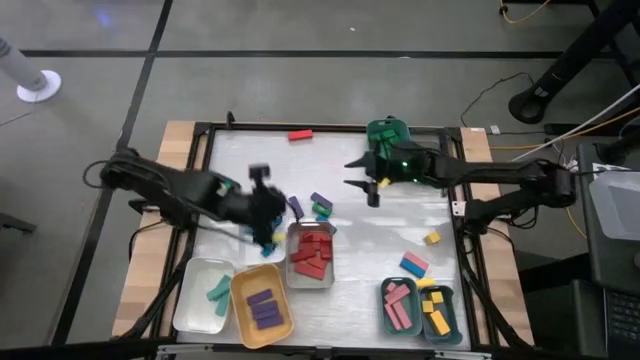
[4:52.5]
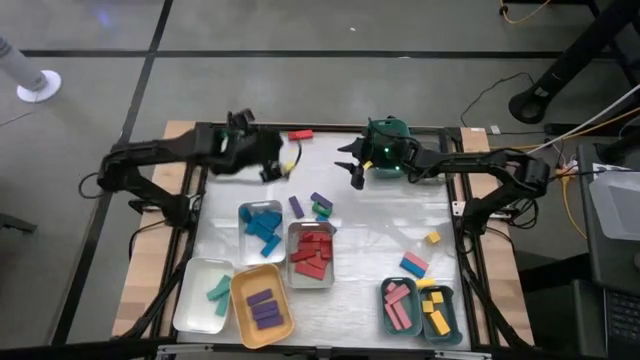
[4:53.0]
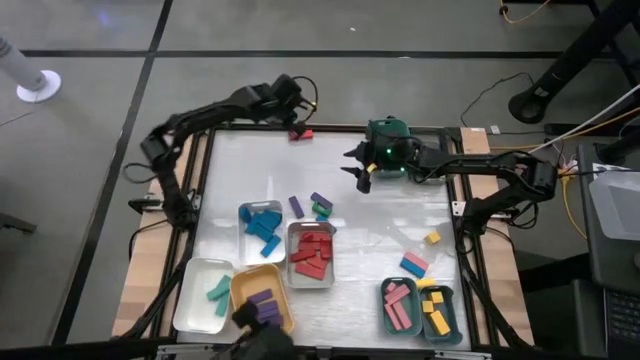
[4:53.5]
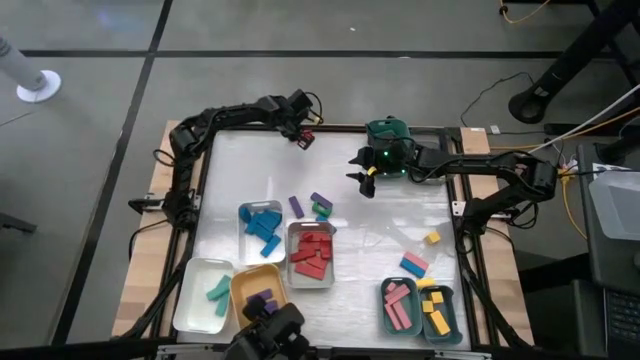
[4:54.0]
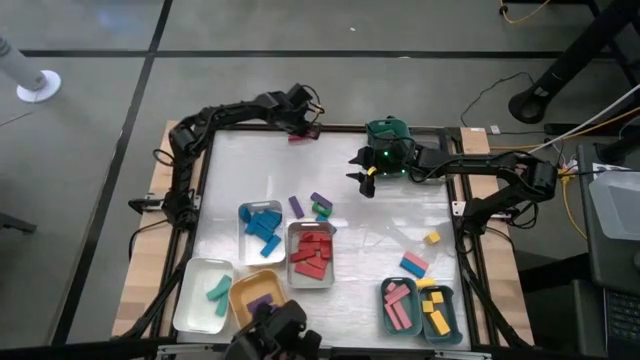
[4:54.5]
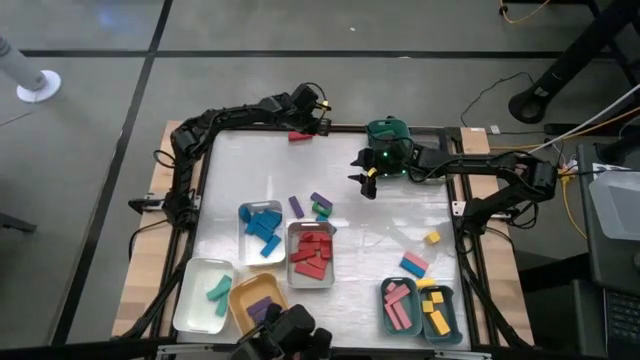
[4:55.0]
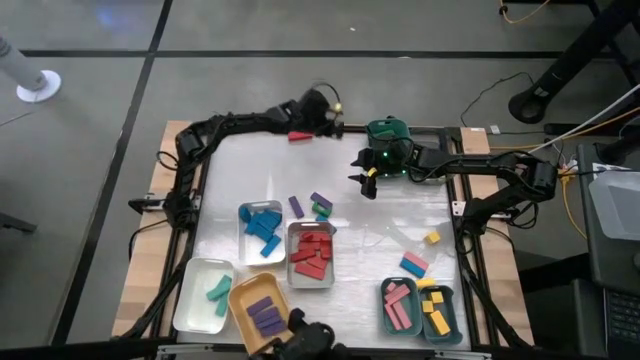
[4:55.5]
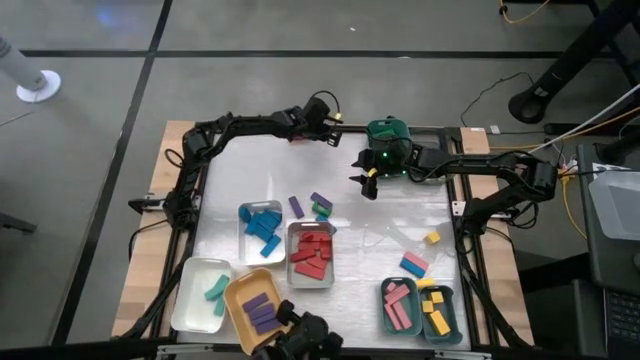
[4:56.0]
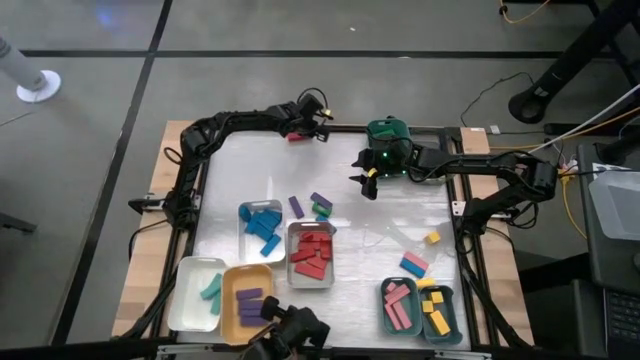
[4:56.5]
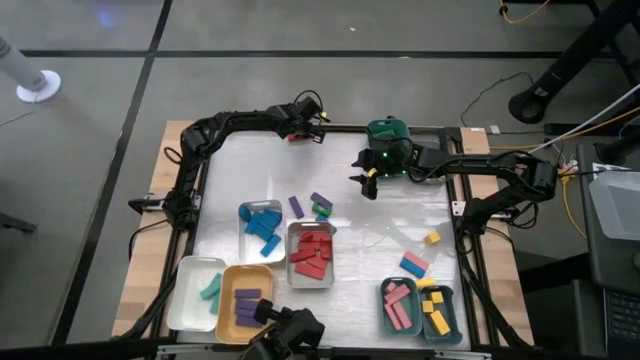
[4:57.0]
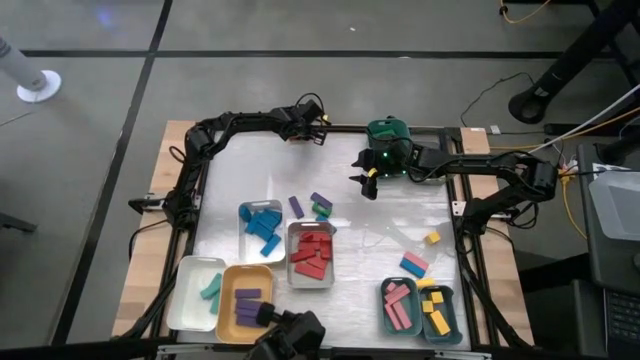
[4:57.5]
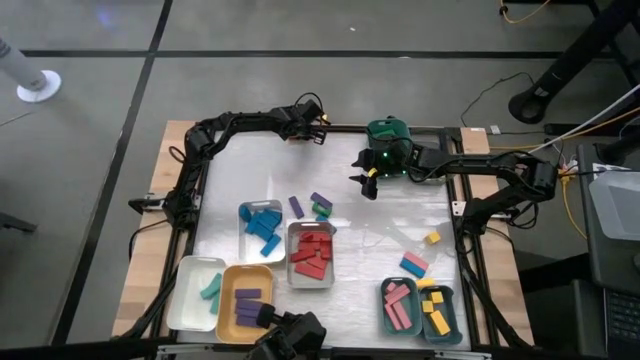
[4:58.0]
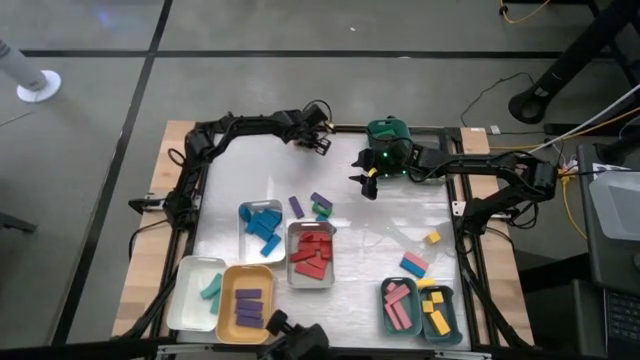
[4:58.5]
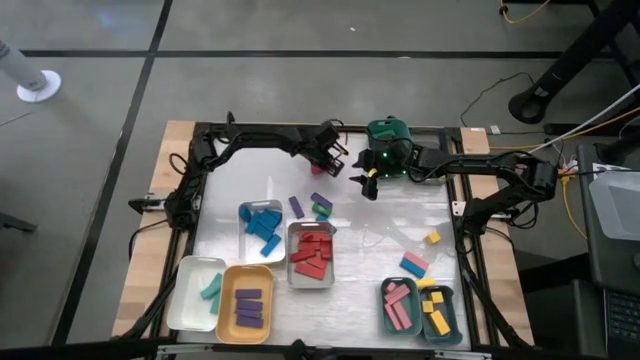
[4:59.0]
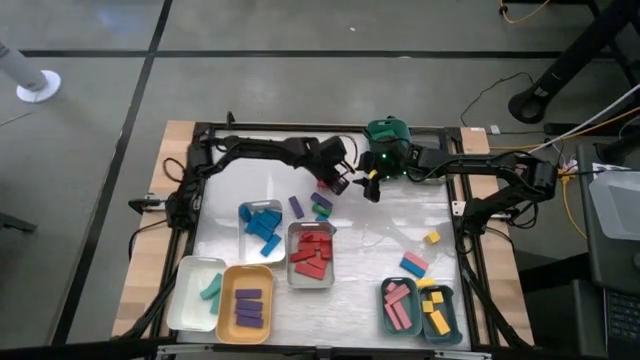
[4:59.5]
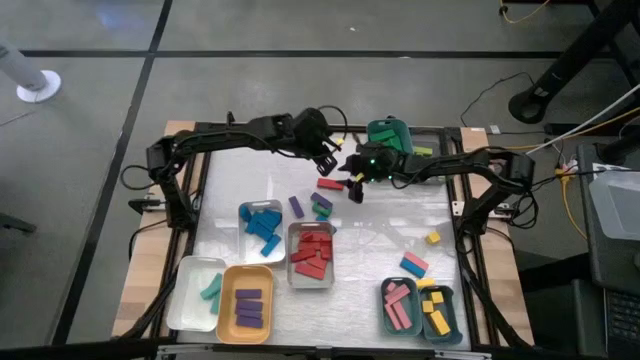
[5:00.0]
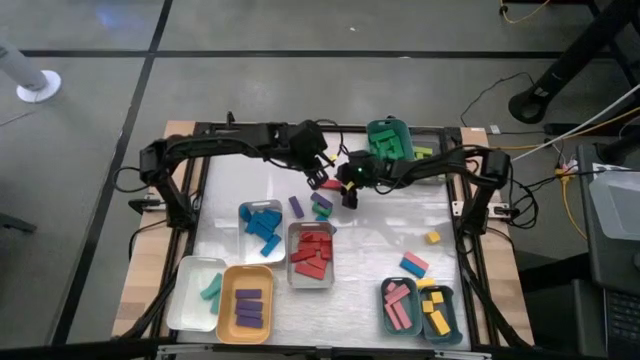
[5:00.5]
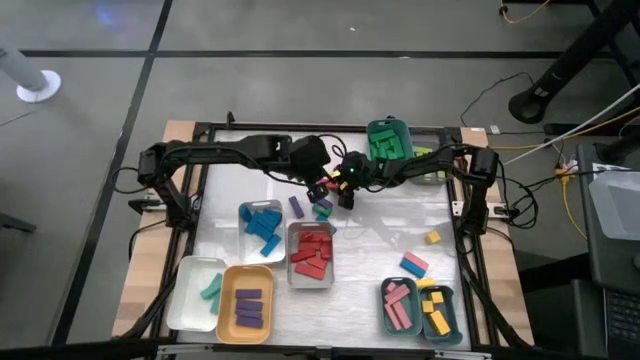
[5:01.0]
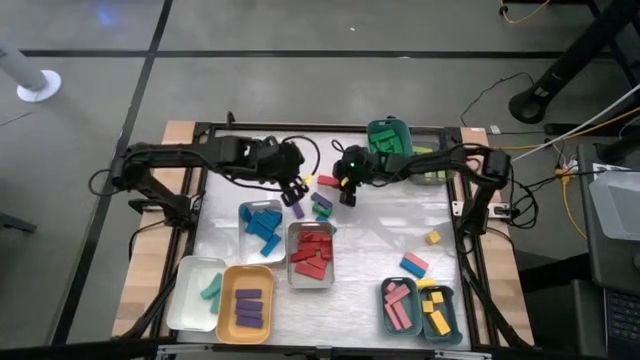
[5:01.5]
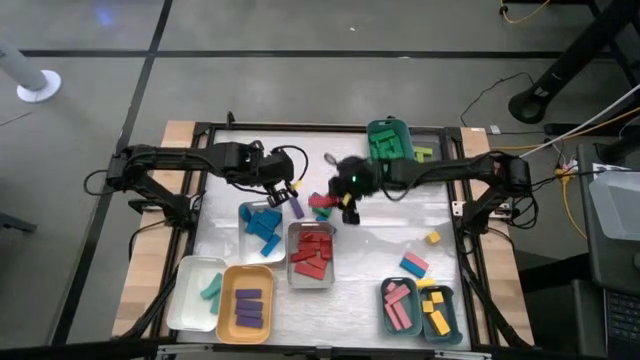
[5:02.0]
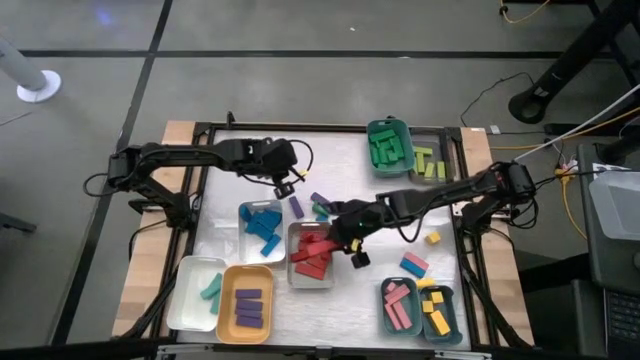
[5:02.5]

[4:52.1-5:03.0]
Task: Sort blocks
Put the red block into the gray bin

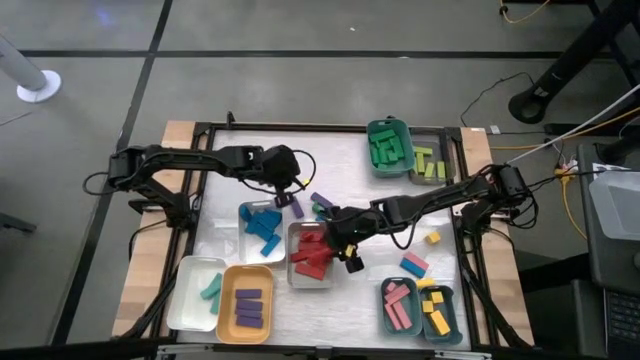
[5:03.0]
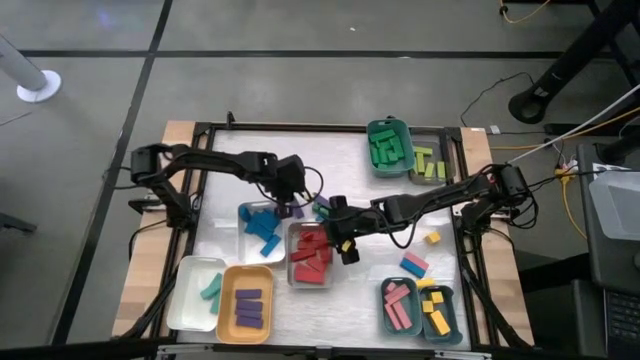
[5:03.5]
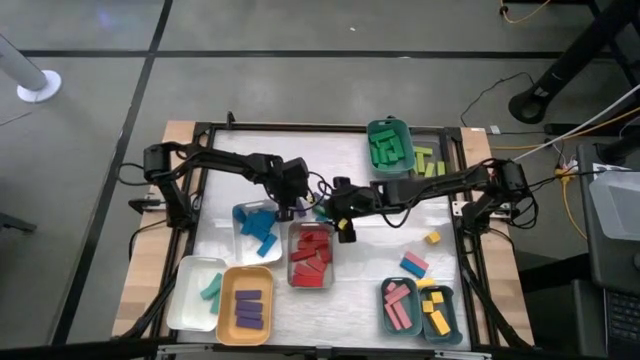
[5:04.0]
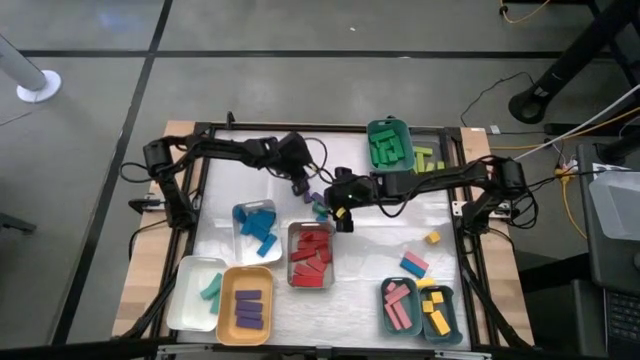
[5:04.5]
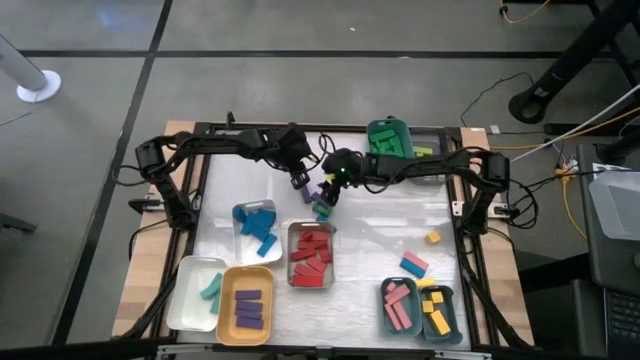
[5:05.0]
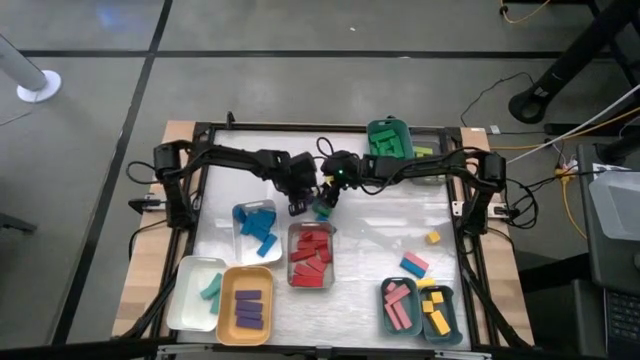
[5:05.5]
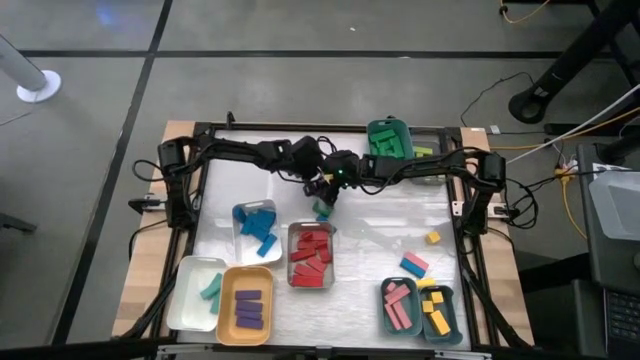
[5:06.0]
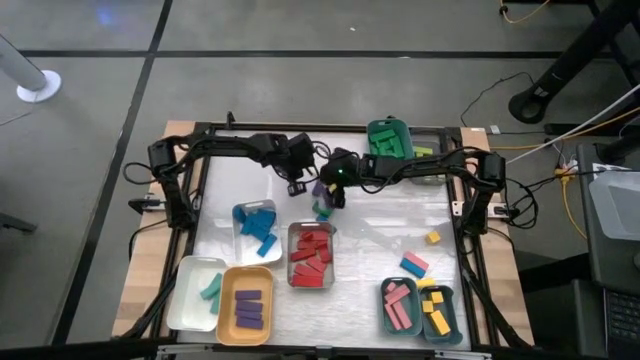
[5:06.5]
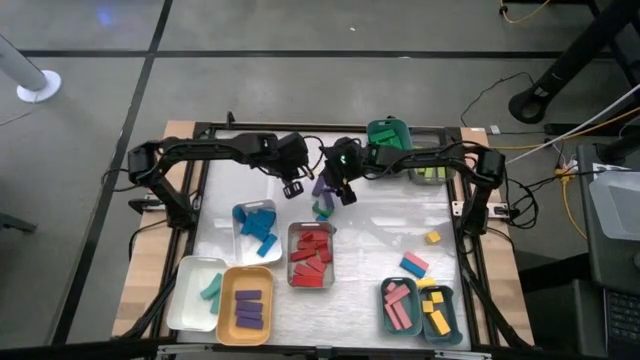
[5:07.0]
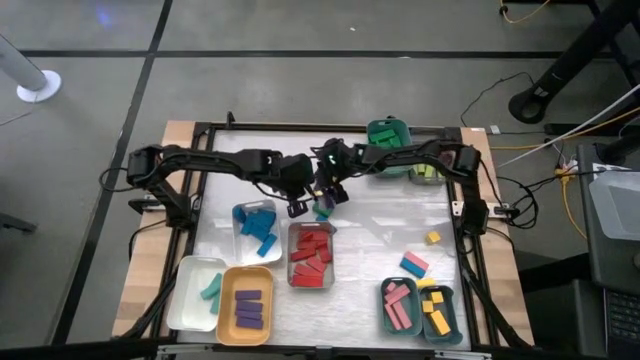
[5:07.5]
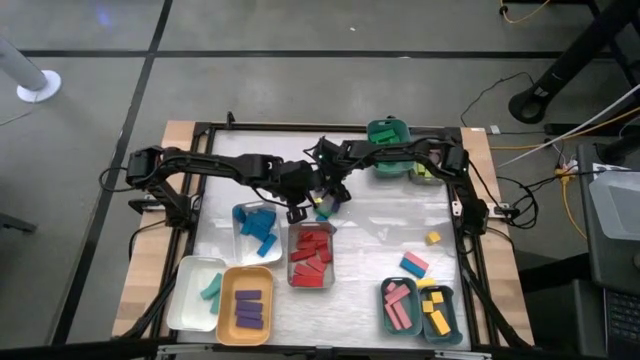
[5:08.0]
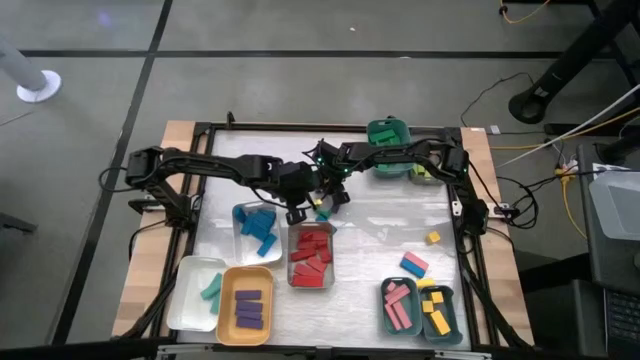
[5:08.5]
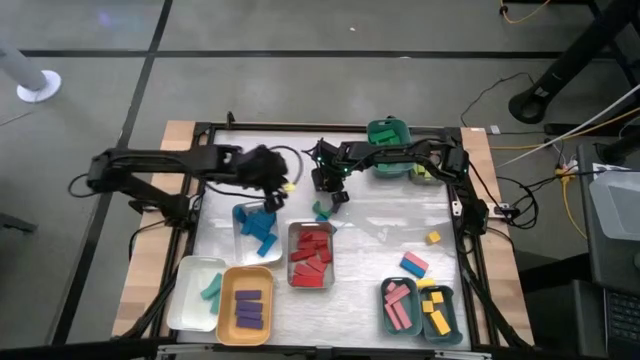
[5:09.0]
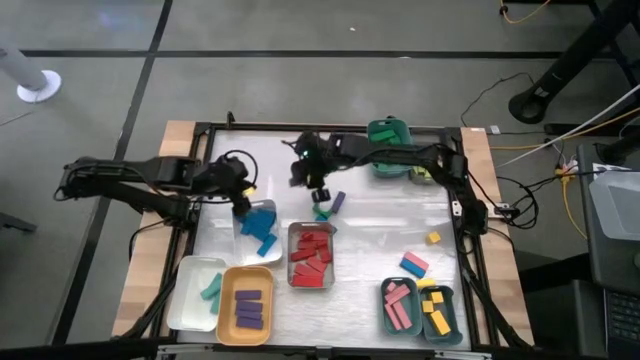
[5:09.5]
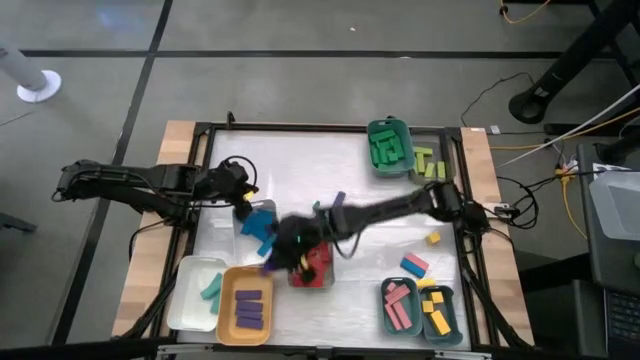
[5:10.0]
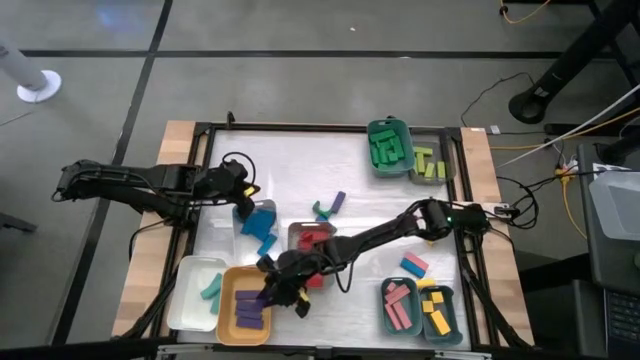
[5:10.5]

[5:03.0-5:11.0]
Put the purple block into the yellow bin

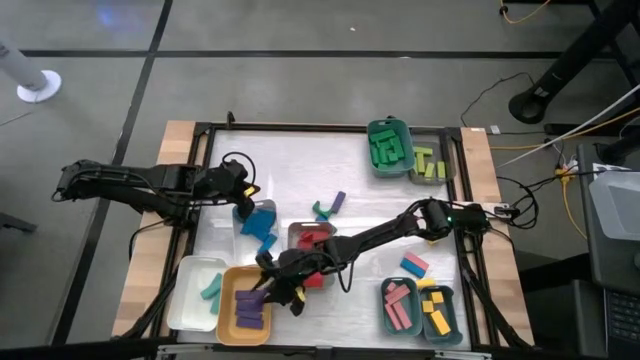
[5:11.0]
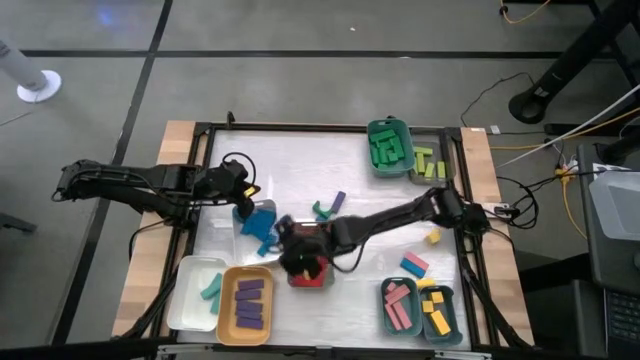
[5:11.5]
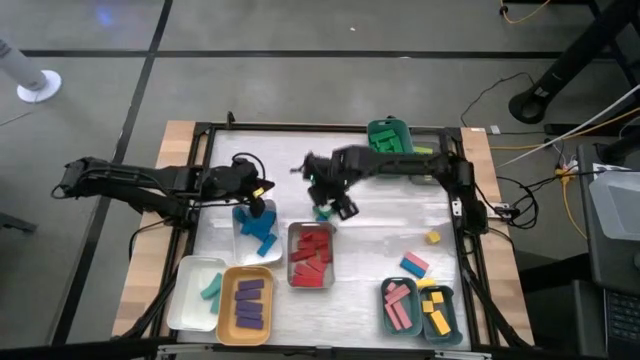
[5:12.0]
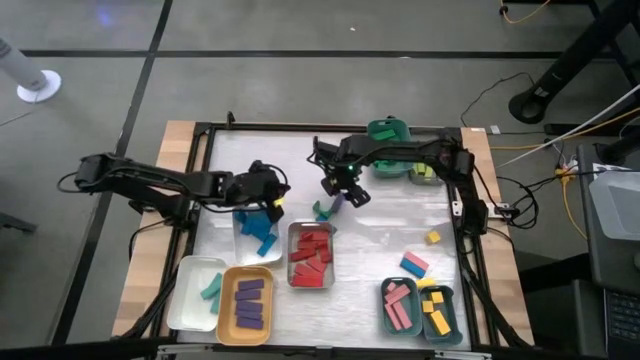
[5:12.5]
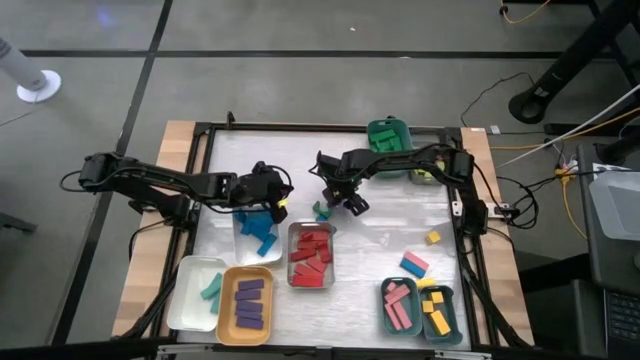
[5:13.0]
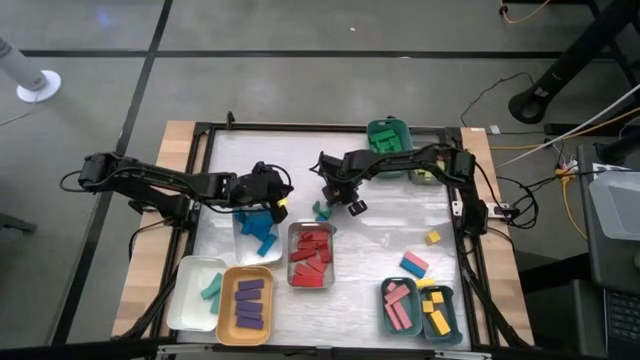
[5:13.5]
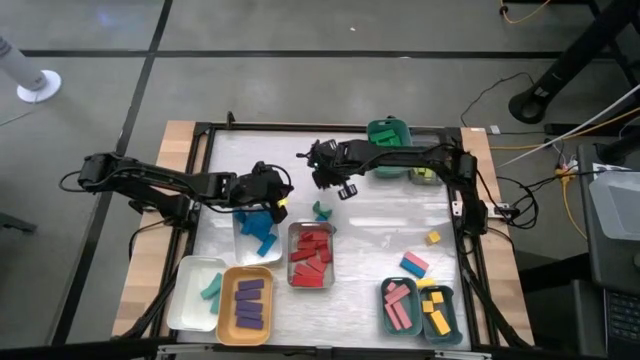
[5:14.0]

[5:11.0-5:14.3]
Put the purple block into the yellow bin
